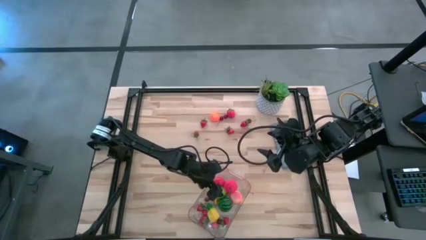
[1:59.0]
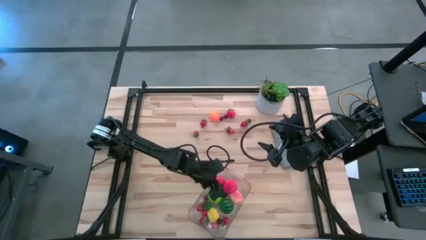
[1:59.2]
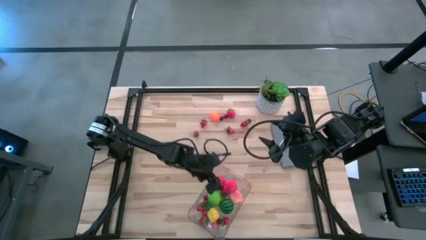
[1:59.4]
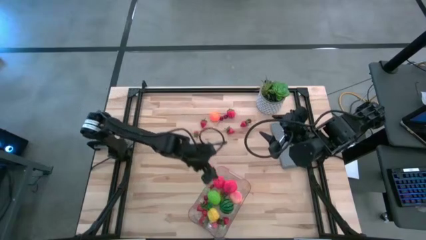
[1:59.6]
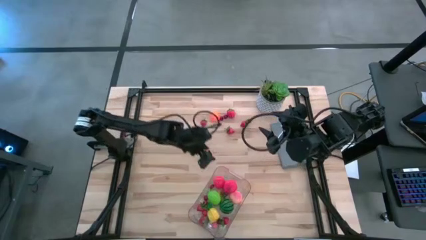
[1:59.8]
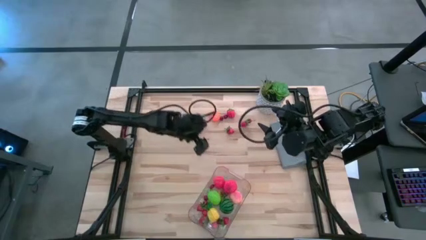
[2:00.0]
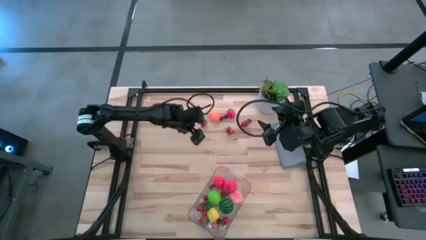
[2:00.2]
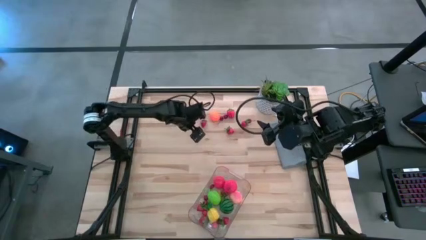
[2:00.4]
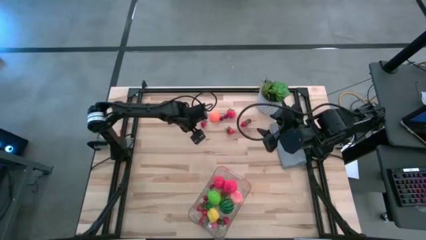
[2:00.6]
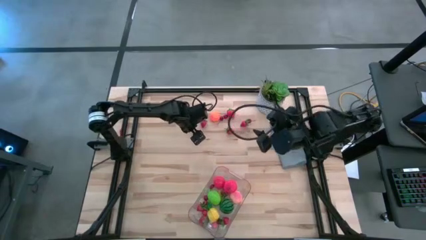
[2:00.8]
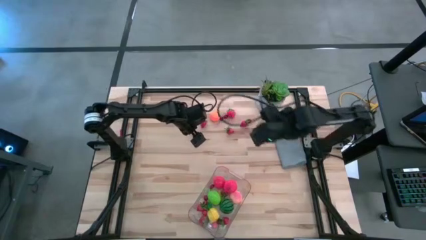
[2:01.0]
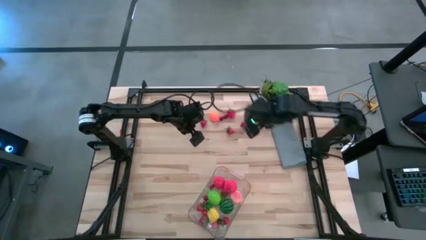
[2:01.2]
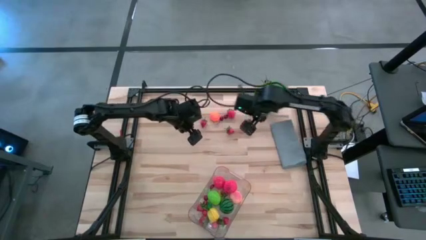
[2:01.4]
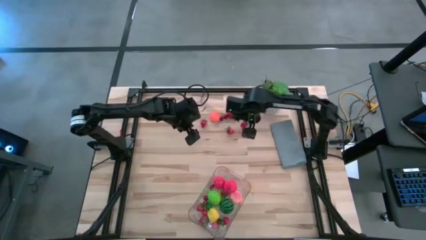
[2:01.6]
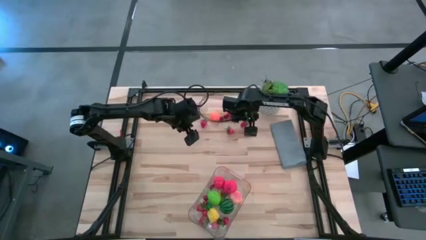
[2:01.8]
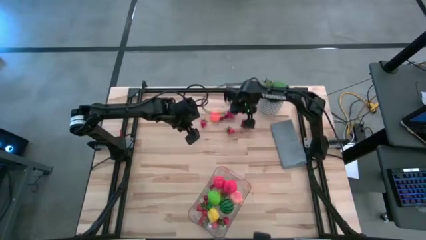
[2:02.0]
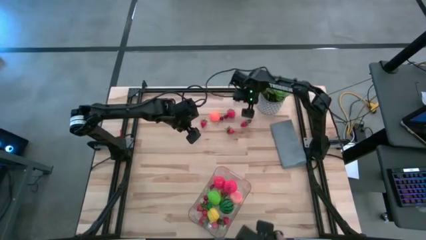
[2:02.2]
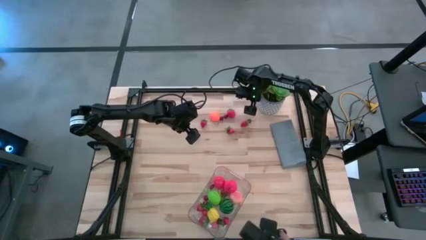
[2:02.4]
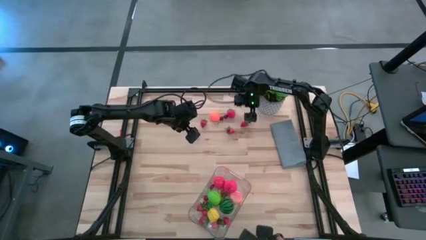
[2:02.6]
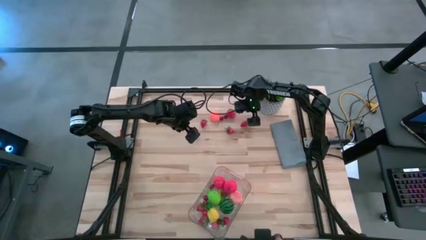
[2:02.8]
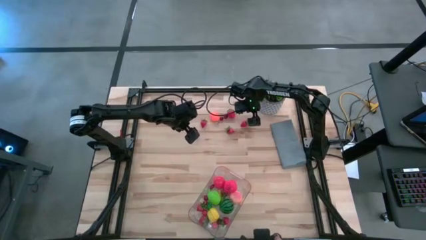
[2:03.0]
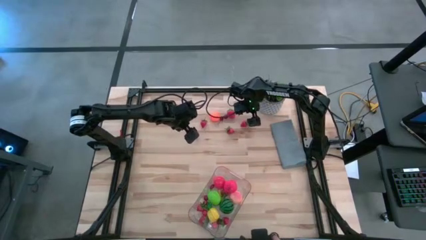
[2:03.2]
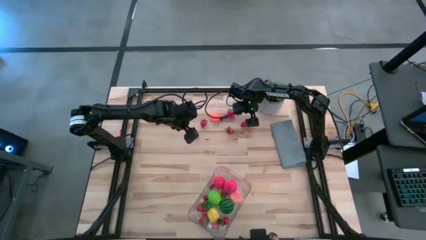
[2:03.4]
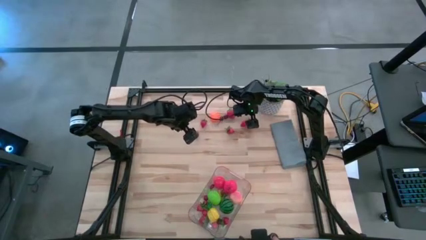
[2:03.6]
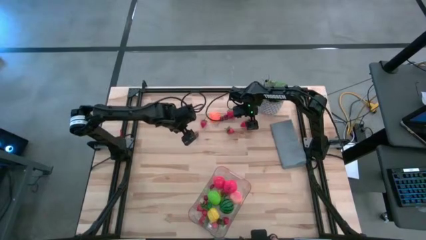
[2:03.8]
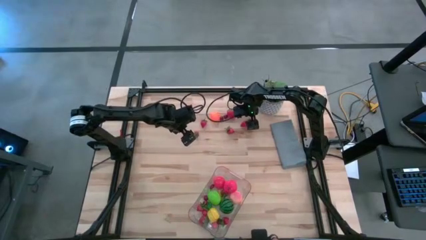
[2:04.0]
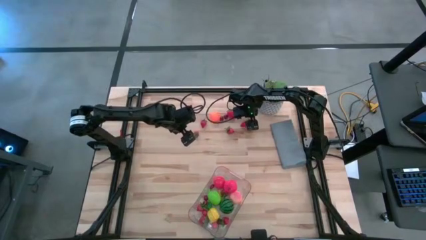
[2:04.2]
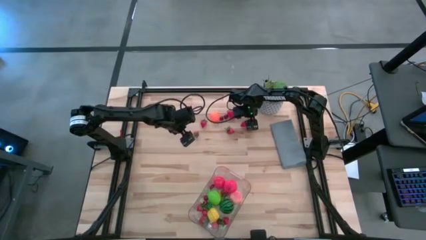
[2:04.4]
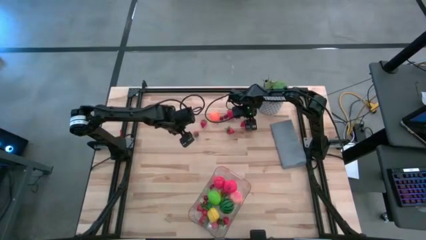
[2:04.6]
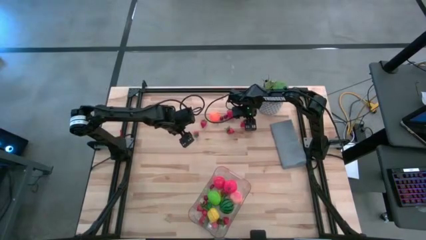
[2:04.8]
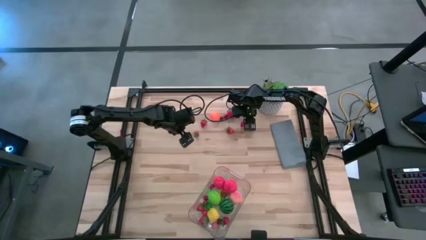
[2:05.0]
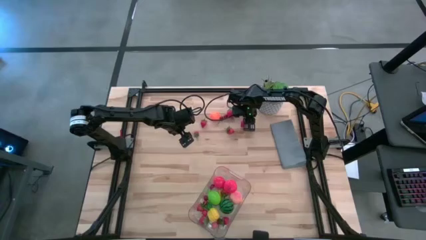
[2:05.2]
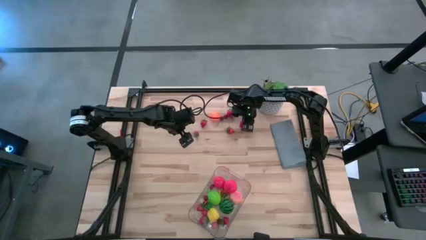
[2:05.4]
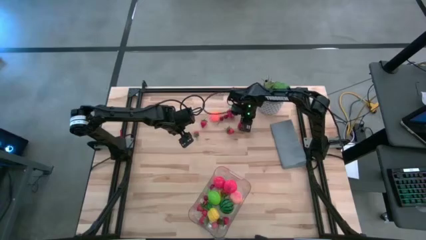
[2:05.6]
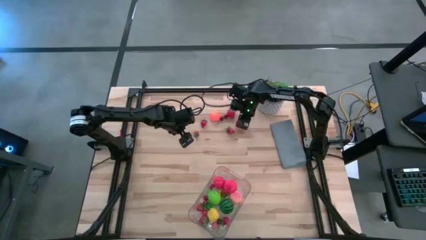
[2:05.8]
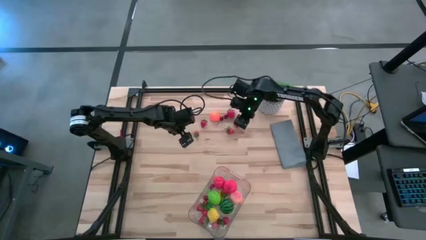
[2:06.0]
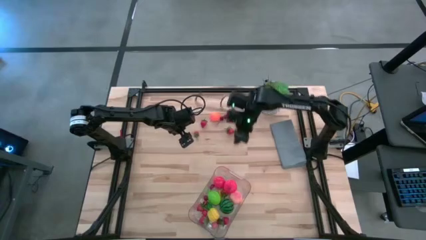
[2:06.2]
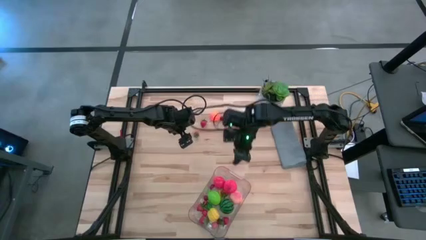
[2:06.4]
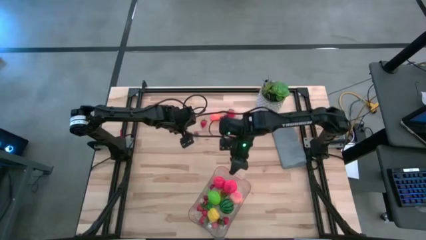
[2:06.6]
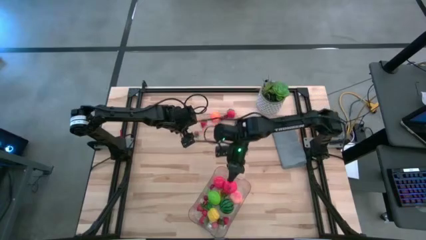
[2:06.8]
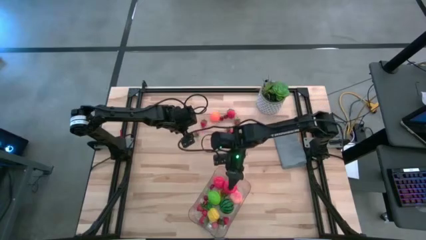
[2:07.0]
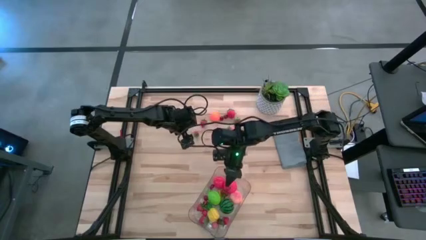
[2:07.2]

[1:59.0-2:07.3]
Task: Pick and placing Produce into tupperware
Put the red cherry into the transparent basket

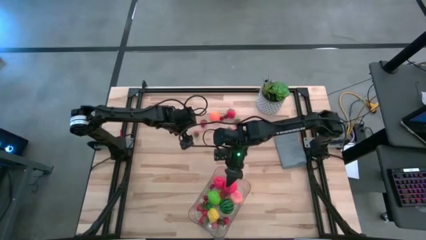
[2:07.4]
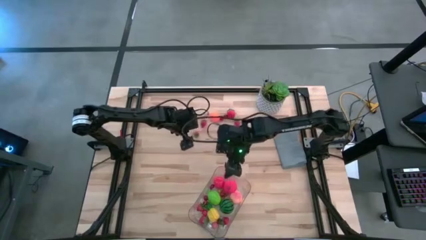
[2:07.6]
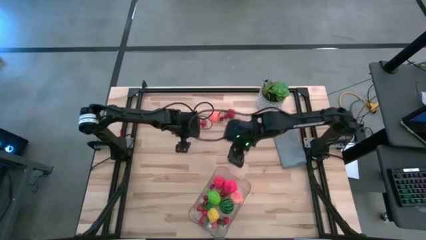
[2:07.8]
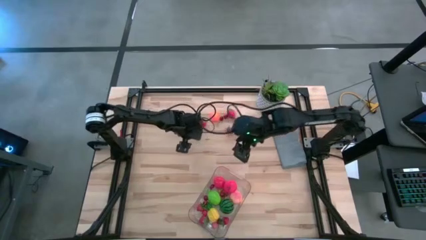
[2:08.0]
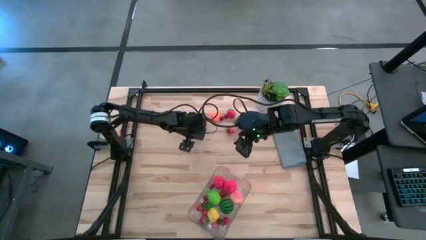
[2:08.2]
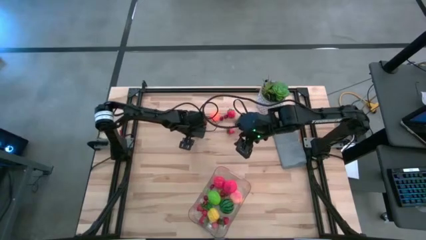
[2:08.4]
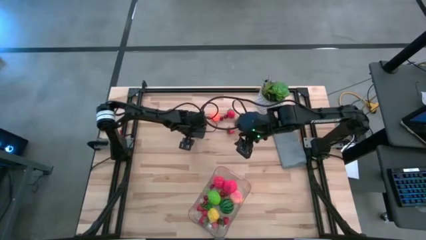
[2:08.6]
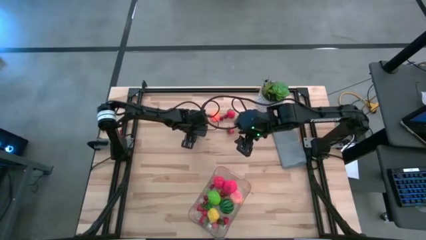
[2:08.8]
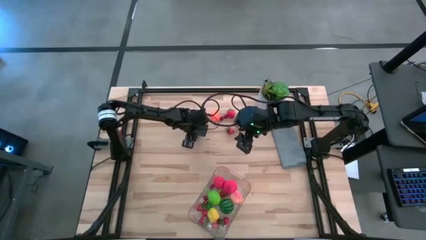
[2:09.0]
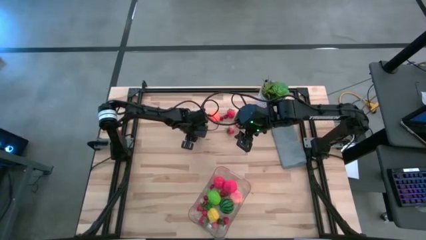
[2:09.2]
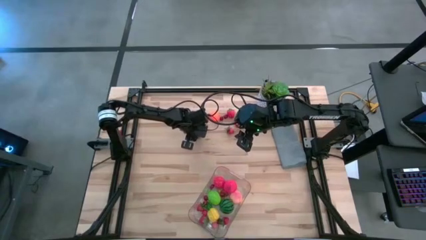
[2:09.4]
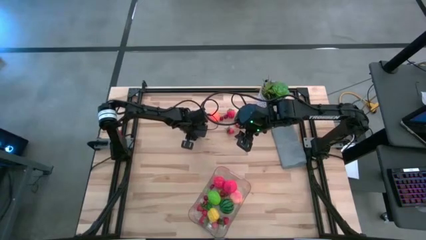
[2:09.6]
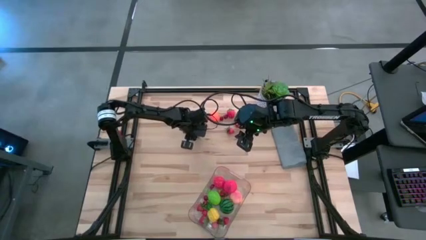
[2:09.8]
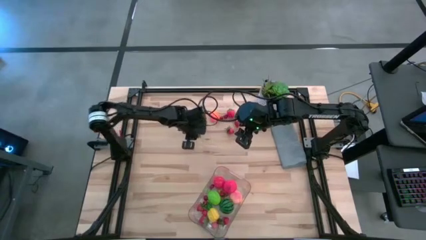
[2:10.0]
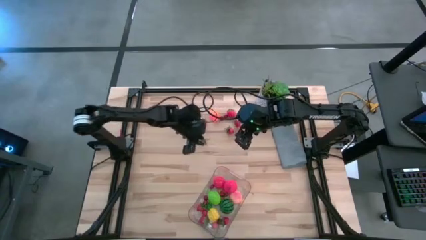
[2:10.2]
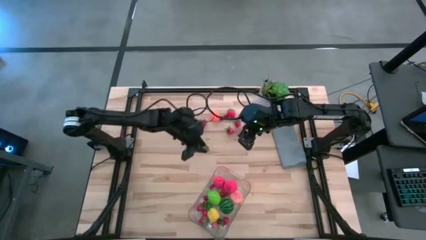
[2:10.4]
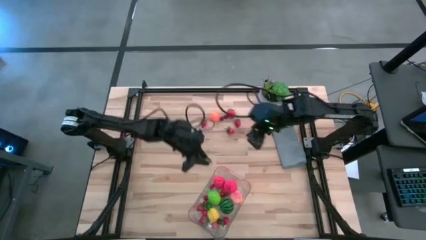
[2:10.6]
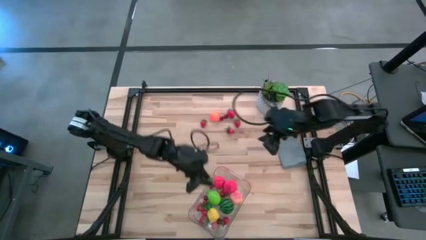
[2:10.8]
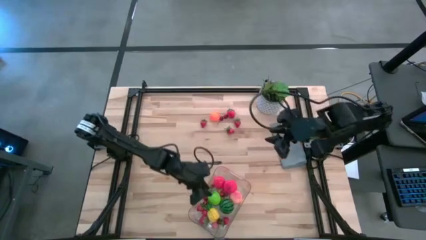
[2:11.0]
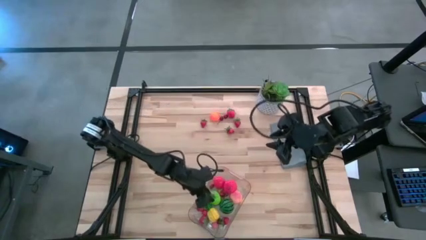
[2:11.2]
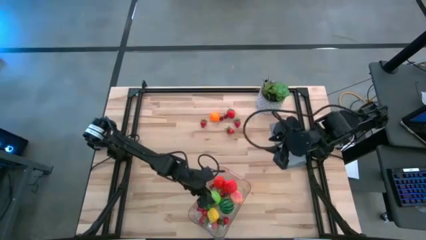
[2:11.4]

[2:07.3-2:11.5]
Put the red strawberry into the transparent basket

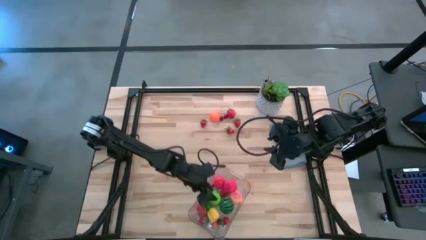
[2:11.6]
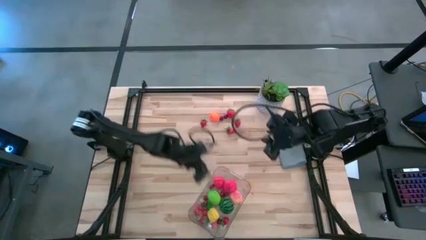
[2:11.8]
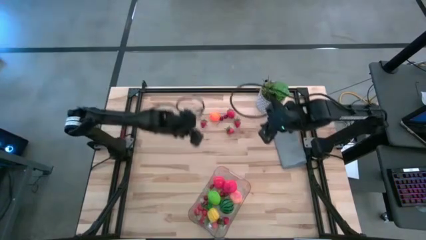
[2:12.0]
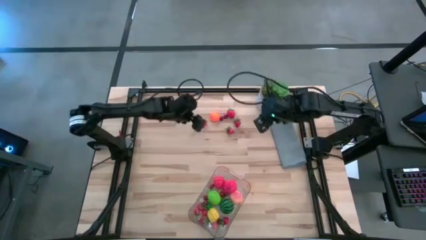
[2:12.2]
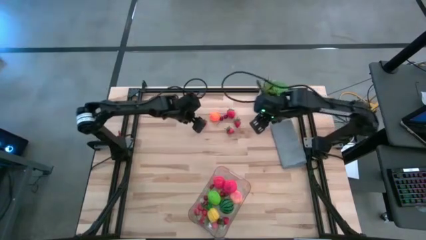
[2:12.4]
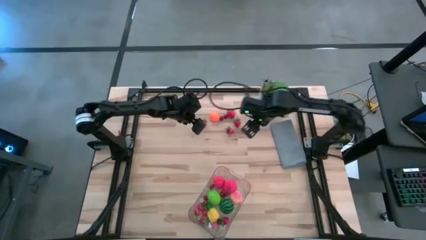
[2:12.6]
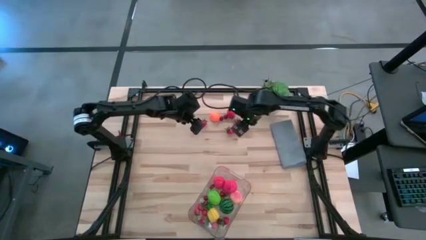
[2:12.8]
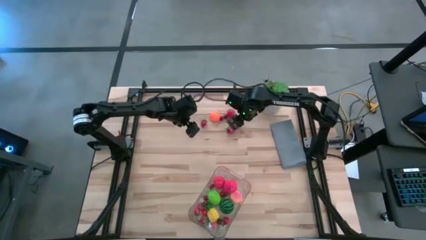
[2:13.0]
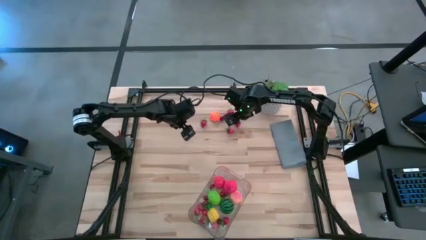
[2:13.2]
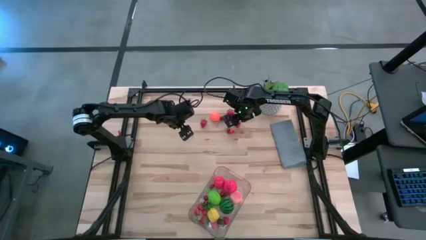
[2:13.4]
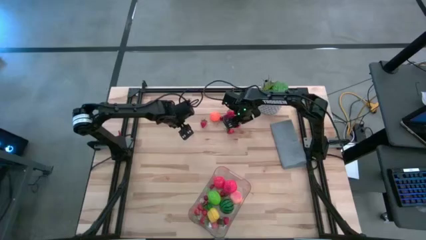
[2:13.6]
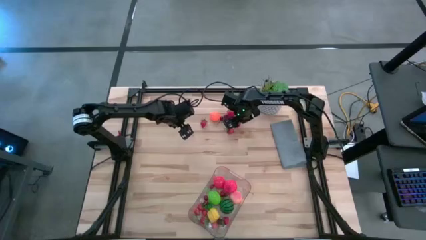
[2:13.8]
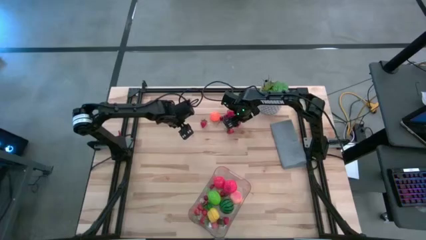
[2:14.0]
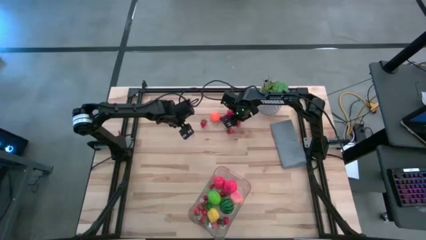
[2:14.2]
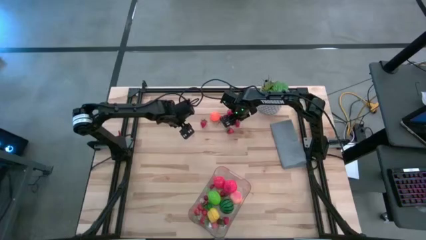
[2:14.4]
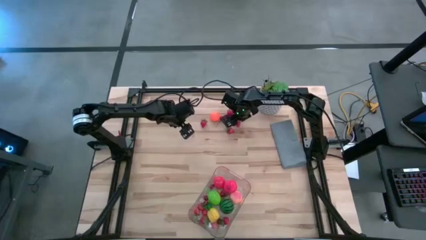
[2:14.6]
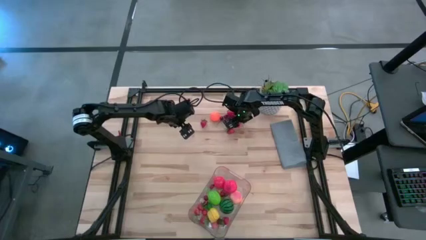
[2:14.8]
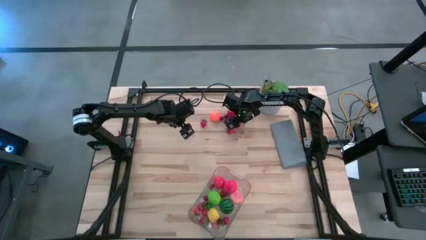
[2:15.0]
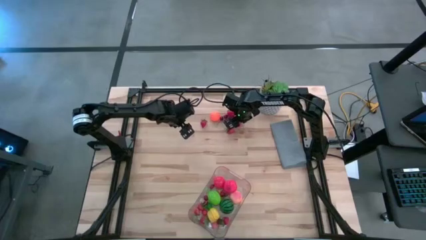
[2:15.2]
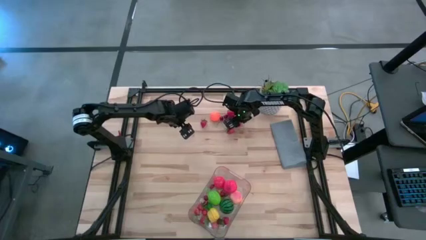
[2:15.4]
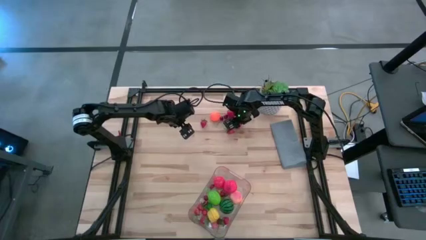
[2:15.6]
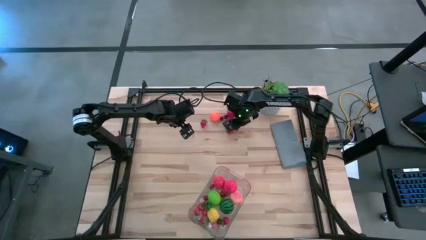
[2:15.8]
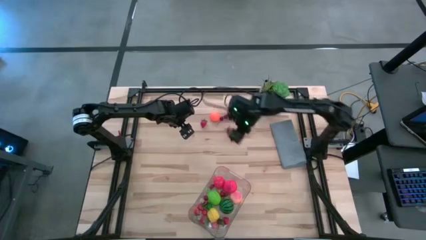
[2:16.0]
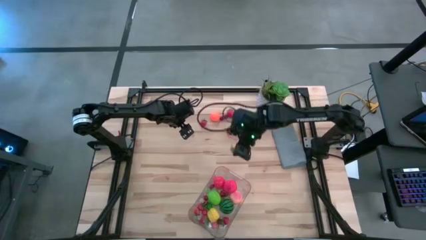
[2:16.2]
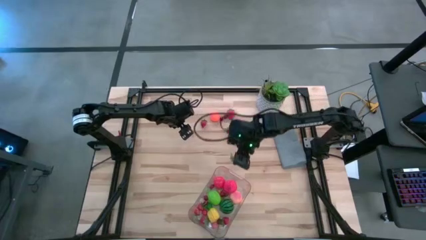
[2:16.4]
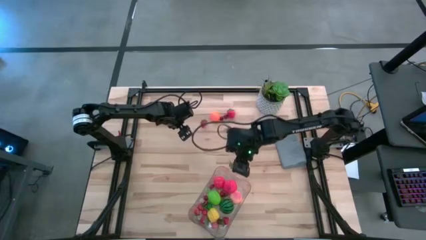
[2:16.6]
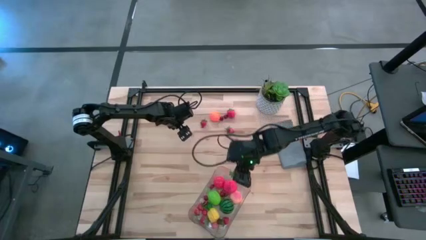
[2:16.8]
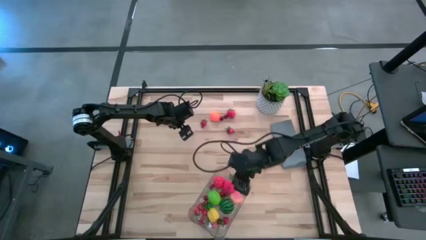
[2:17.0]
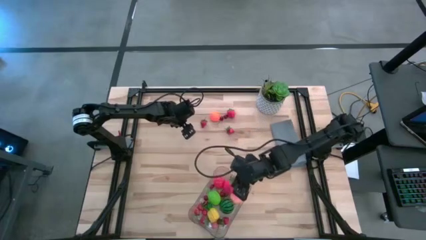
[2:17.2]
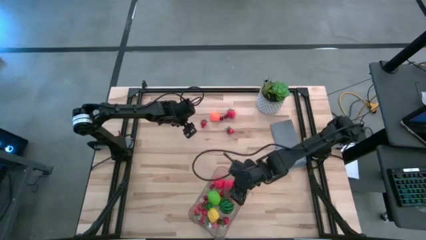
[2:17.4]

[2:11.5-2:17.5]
Put the red strawberry into the transparent basket
